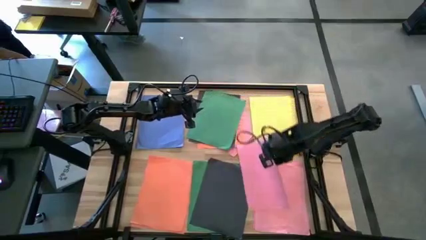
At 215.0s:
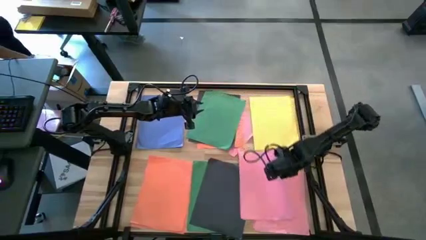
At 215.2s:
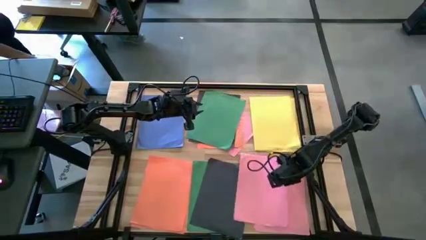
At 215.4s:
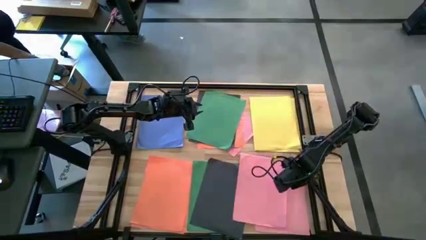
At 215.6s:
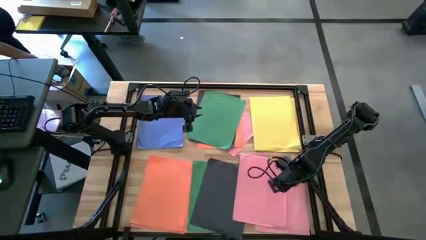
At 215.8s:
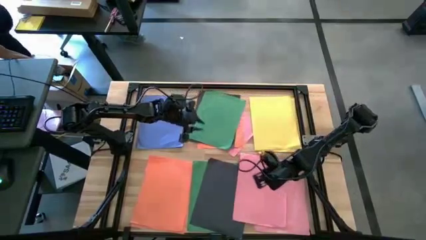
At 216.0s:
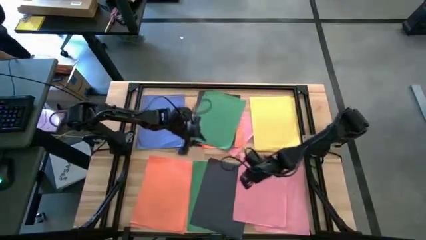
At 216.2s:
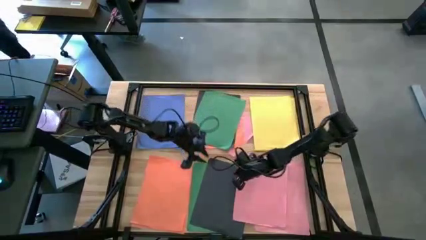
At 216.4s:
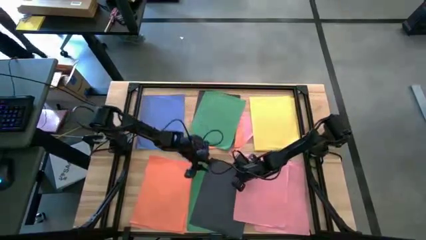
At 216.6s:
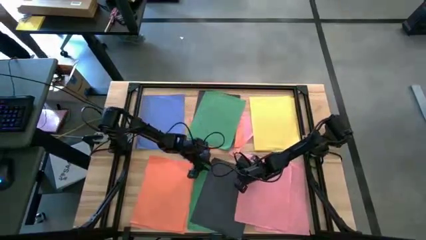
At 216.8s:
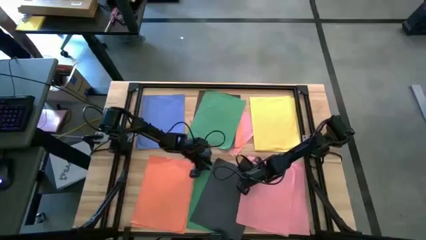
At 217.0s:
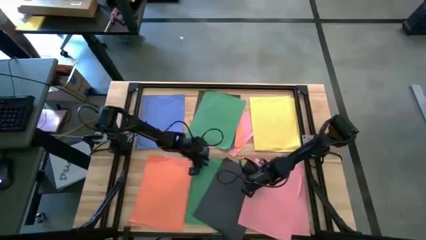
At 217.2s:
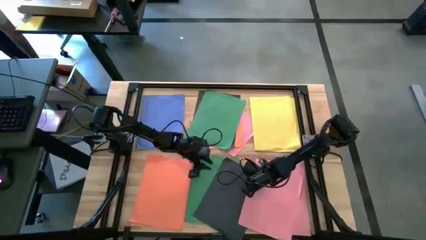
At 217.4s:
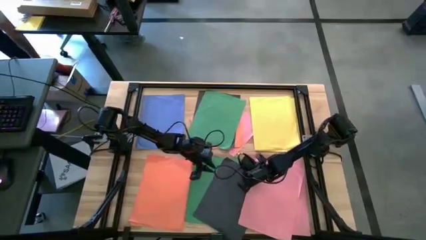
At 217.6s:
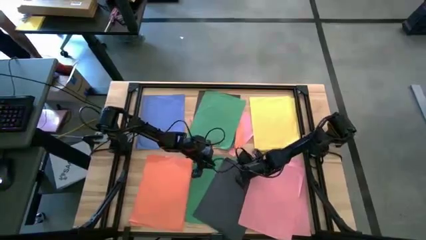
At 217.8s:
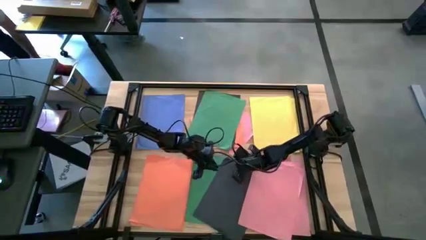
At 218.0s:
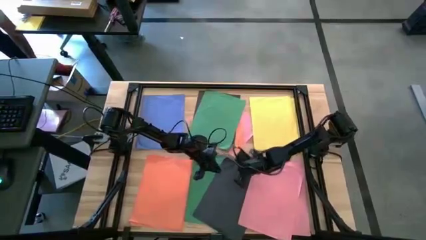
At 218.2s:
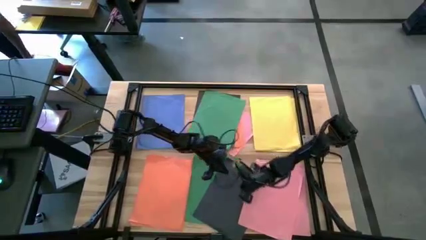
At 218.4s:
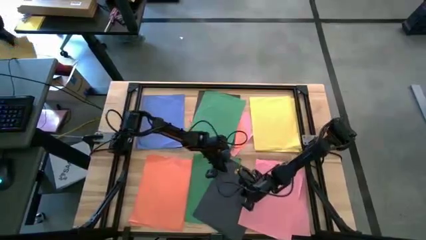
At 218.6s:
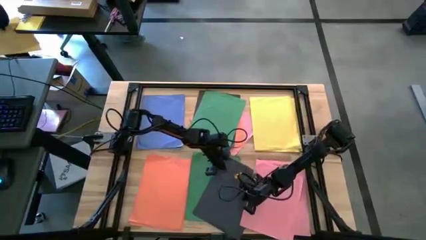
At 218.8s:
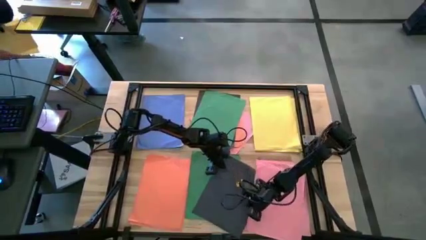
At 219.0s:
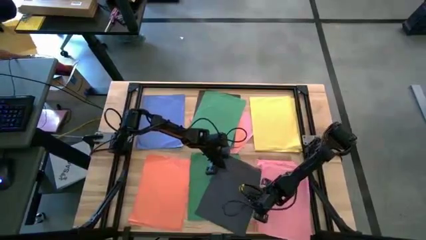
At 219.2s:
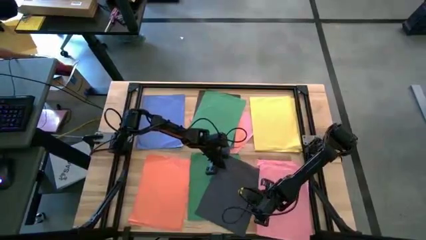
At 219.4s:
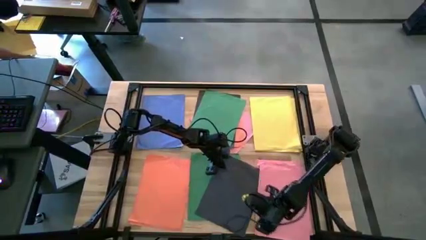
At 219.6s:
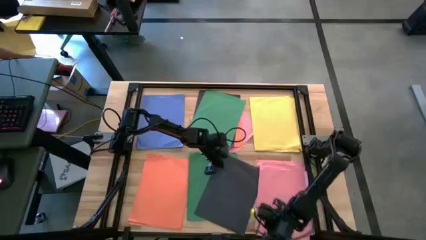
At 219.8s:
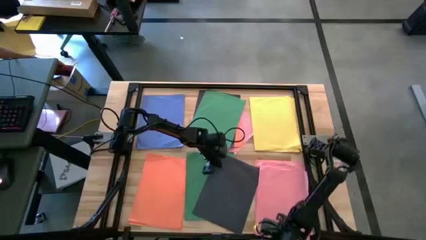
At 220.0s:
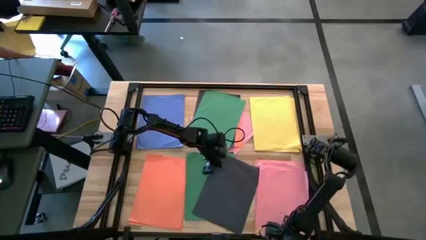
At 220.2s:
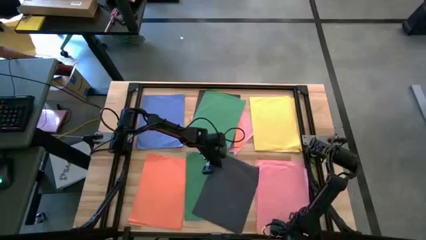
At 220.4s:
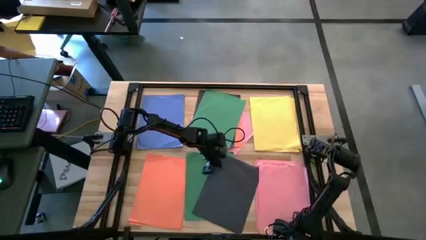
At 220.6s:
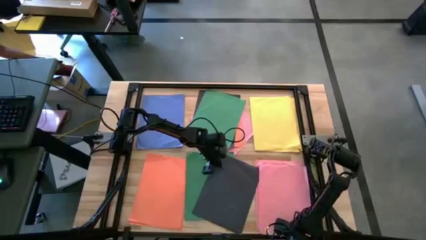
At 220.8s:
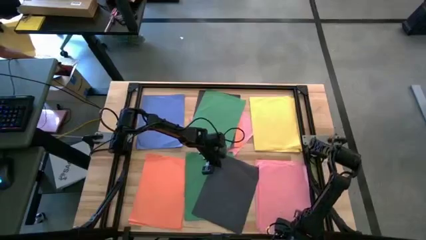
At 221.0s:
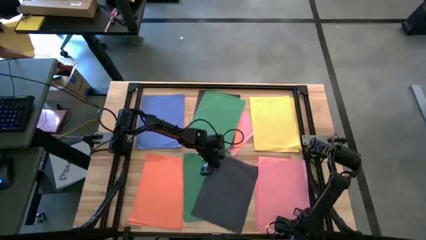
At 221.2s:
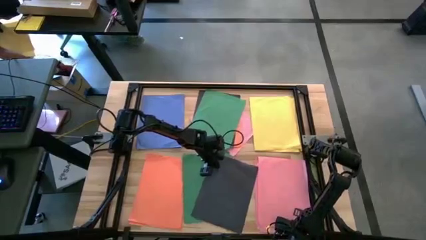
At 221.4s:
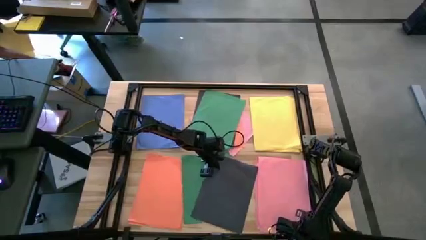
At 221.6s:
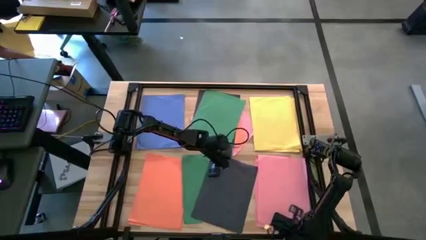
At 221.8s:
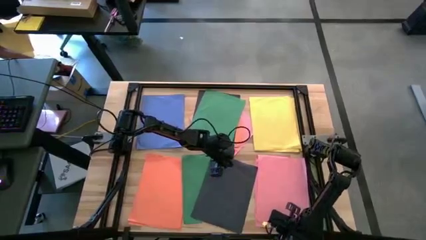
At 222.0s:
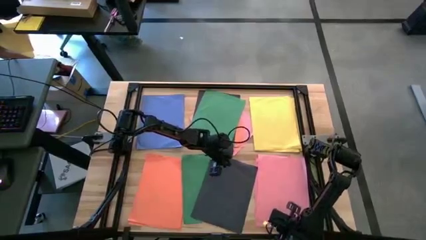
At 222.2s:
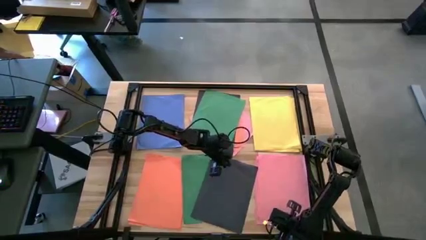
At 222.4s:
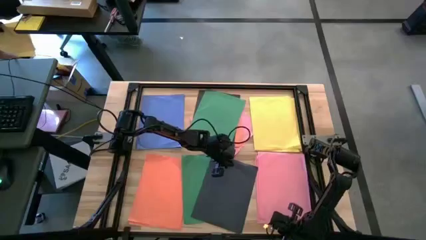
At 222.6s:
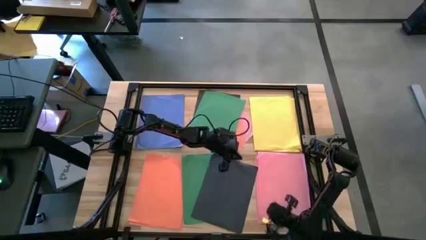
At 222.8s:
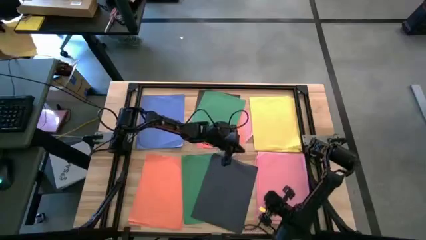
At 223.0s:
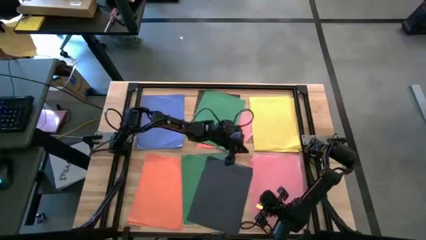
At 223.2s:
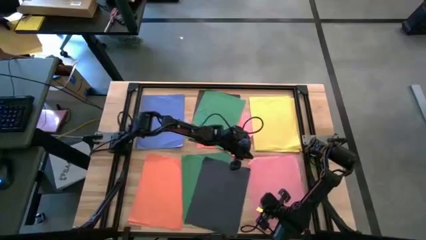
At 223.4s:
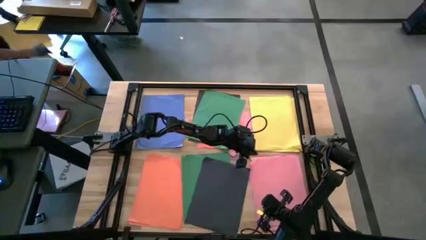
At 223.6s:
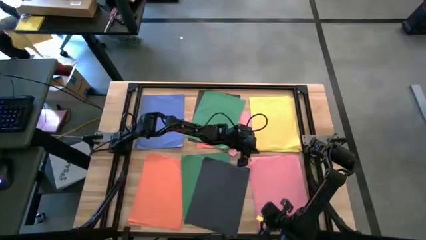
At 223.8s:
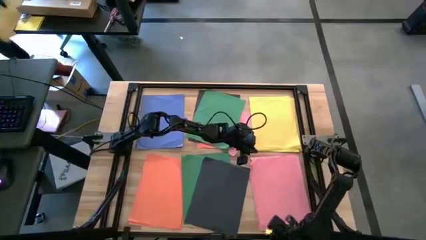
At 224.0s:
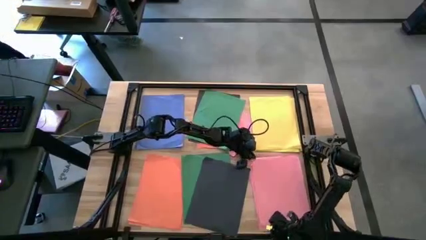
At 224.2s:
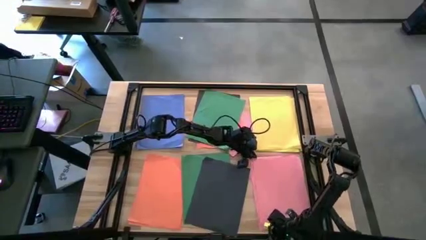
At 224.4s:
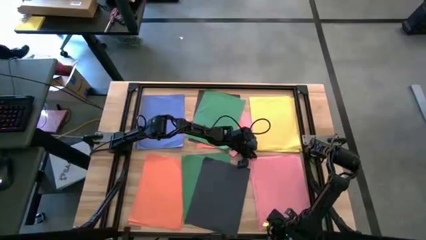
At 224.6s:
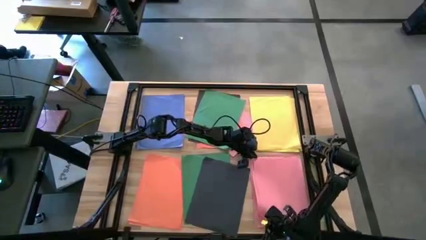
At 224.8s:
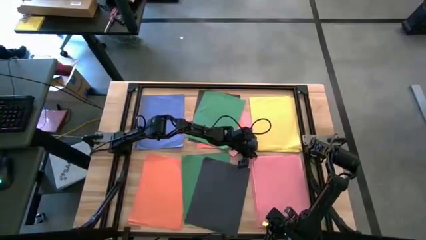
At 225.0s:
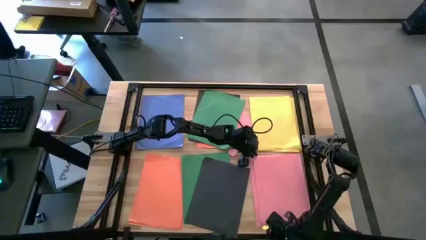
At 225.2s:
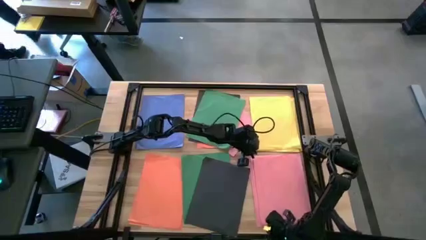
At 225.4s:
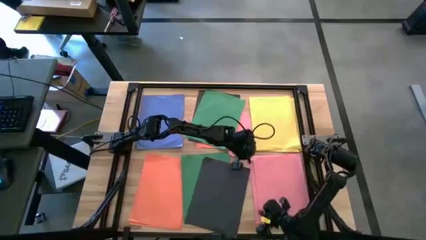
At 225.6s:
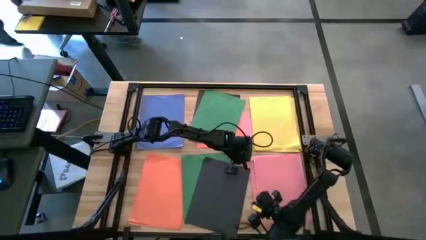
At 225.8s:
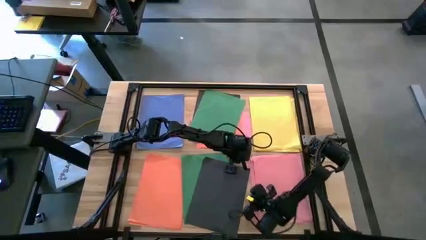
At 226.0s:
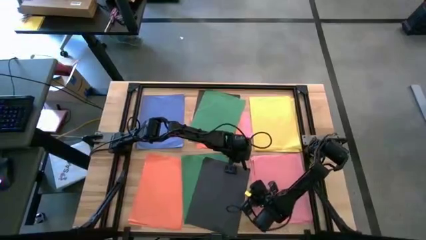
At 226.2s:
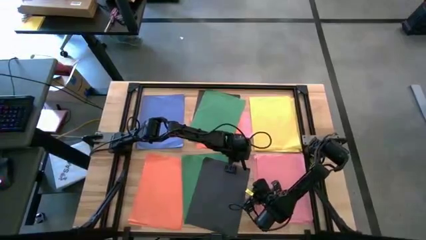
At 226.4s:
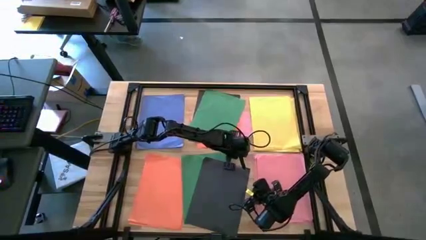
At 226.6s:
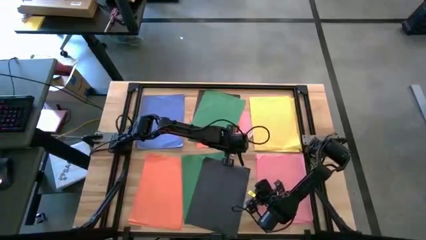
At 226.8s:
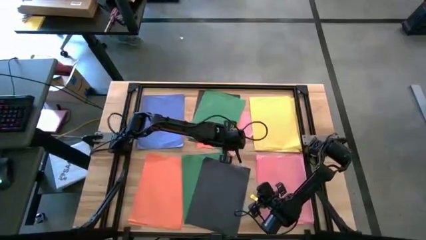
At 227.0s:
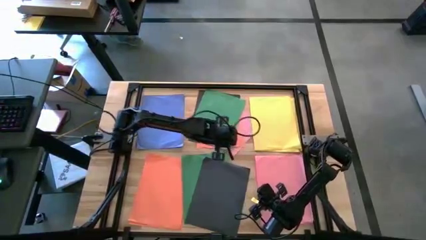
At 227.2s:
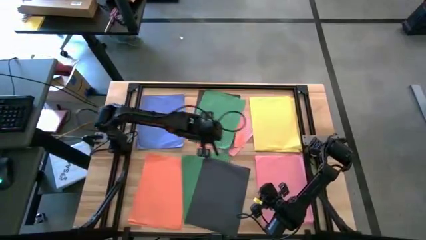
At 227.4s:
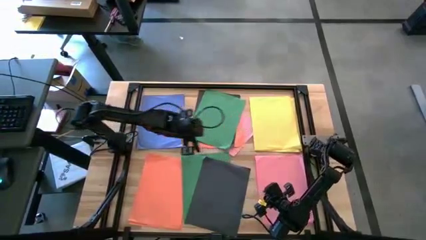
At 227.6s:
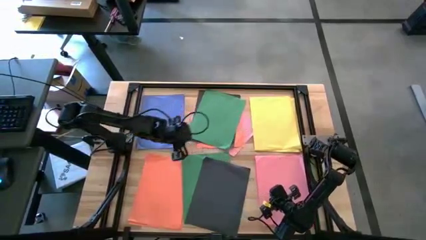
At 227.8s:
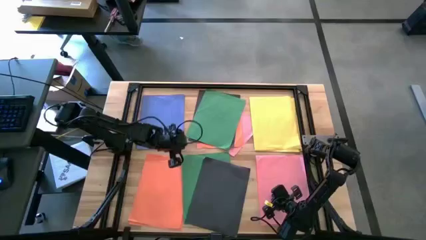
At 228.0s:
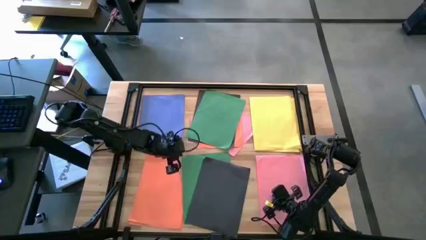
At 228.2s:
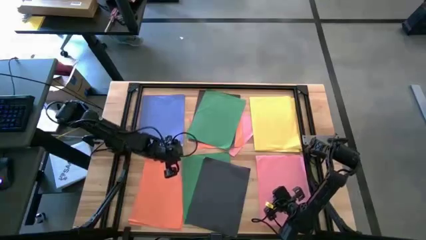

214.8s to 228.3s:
Task: Organize paper
Stack the top pink paper on the bottom pink paper
